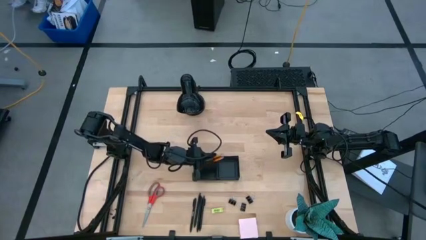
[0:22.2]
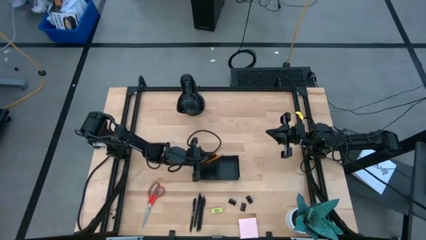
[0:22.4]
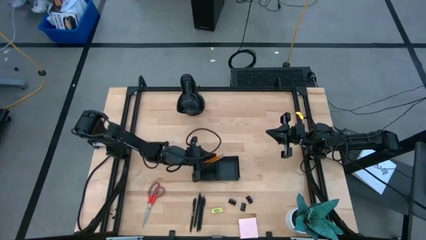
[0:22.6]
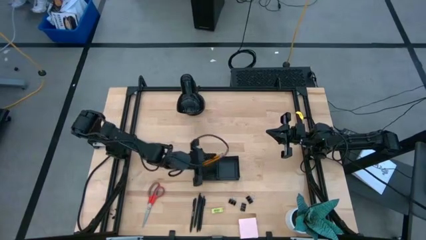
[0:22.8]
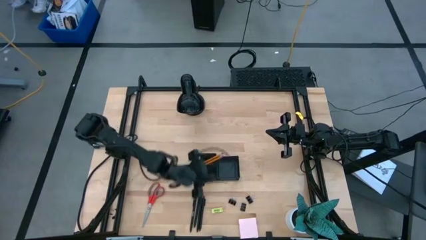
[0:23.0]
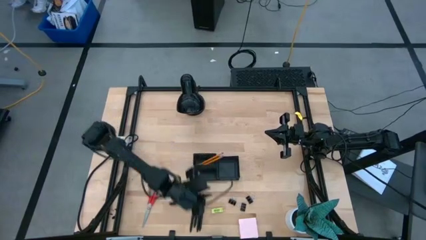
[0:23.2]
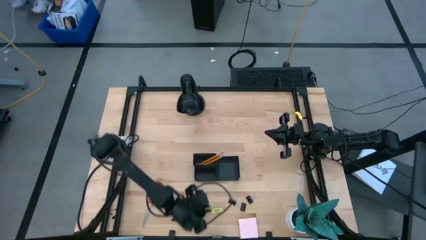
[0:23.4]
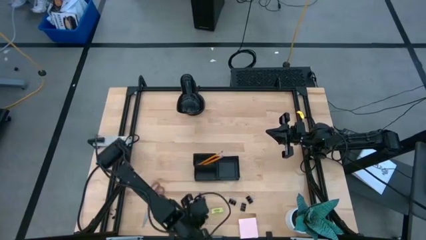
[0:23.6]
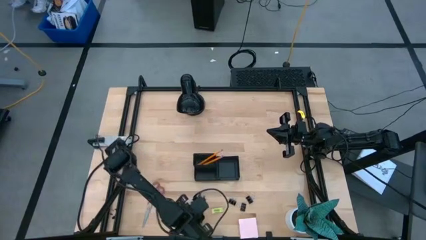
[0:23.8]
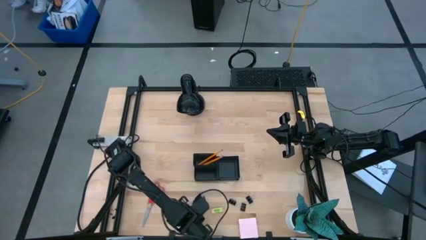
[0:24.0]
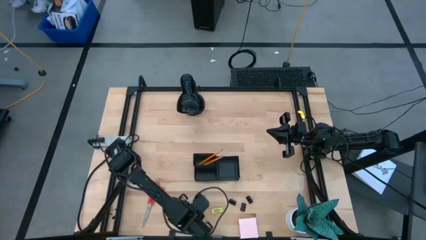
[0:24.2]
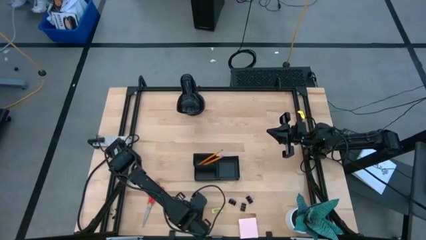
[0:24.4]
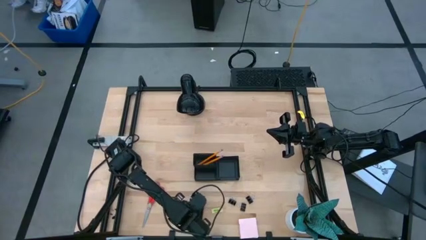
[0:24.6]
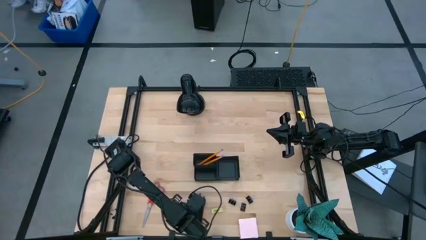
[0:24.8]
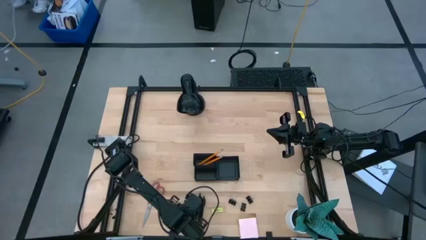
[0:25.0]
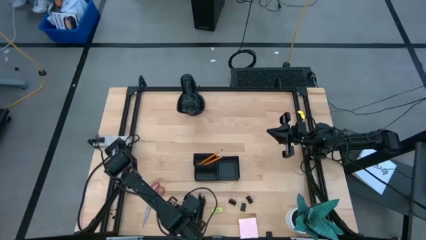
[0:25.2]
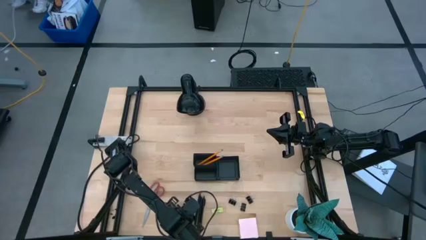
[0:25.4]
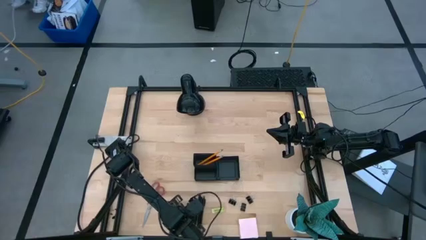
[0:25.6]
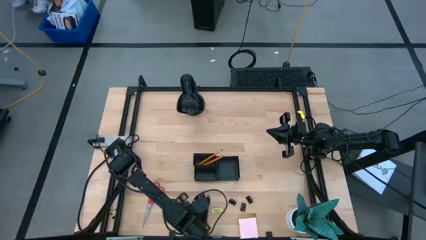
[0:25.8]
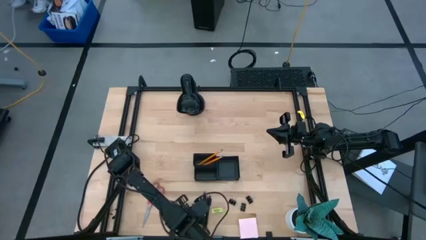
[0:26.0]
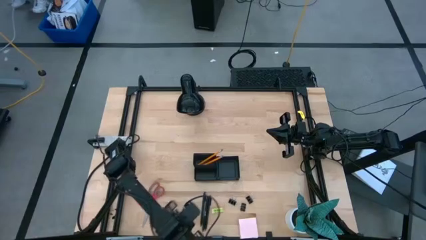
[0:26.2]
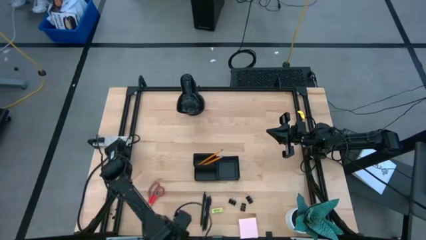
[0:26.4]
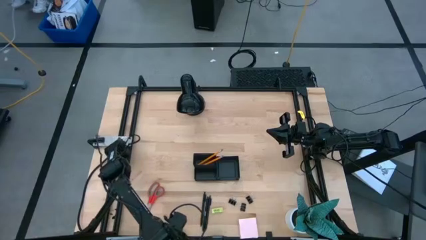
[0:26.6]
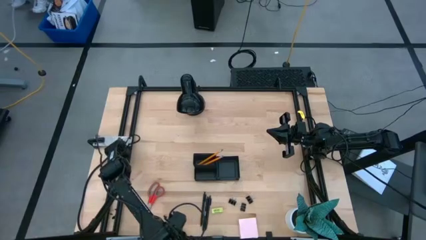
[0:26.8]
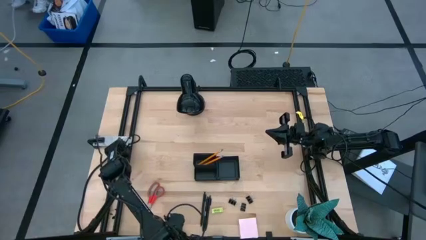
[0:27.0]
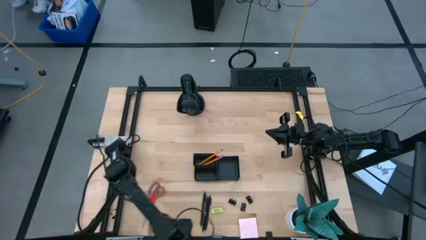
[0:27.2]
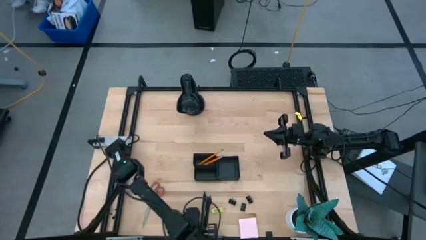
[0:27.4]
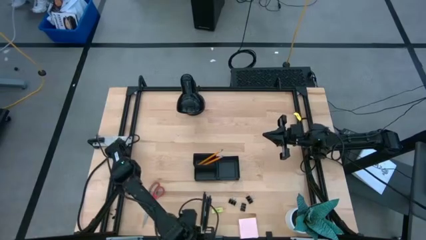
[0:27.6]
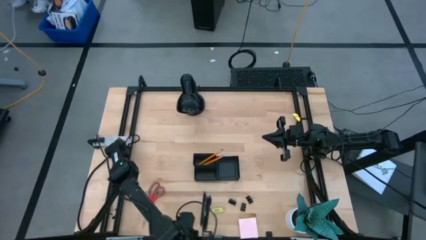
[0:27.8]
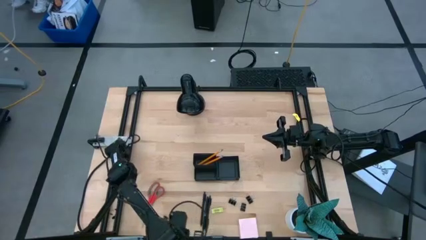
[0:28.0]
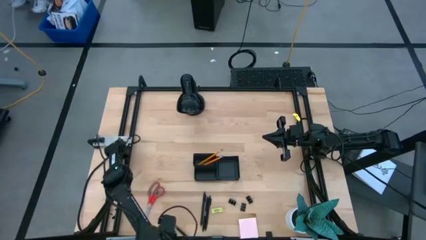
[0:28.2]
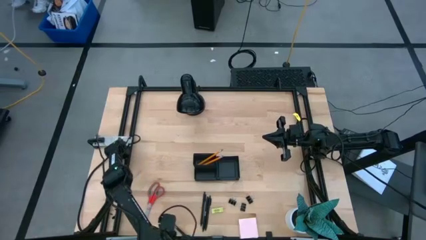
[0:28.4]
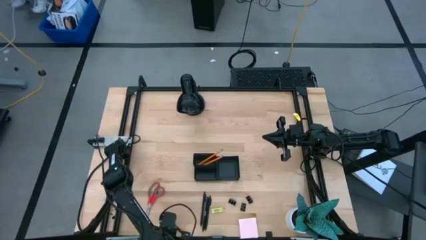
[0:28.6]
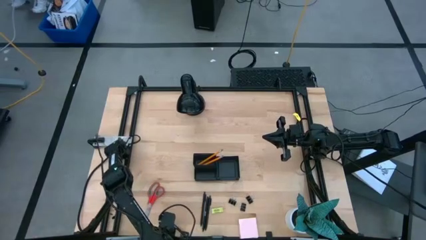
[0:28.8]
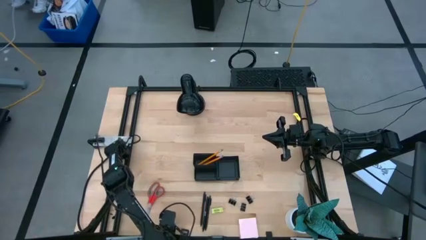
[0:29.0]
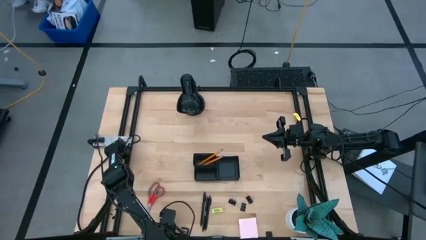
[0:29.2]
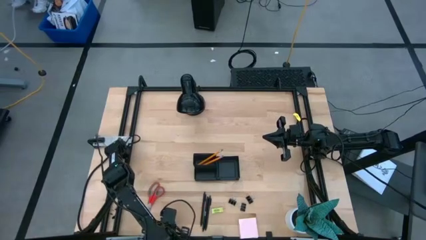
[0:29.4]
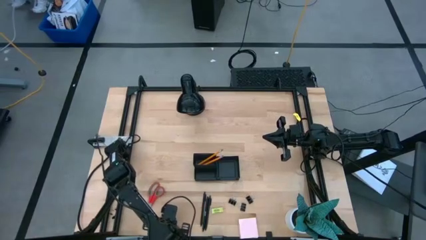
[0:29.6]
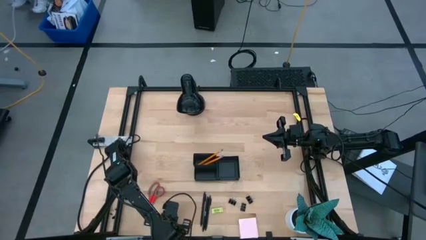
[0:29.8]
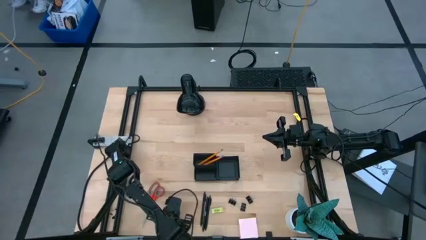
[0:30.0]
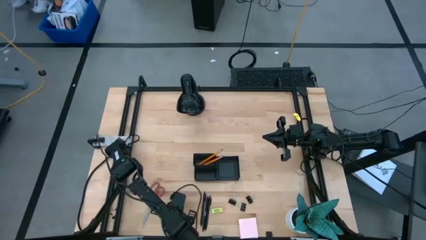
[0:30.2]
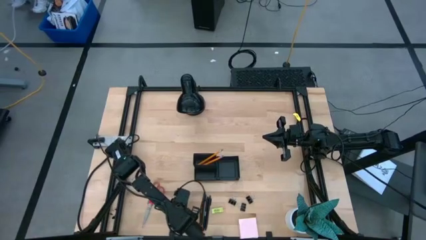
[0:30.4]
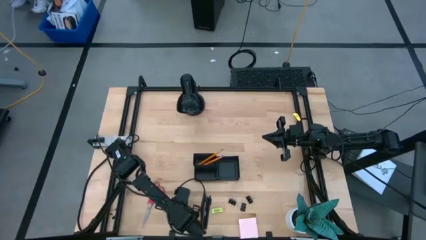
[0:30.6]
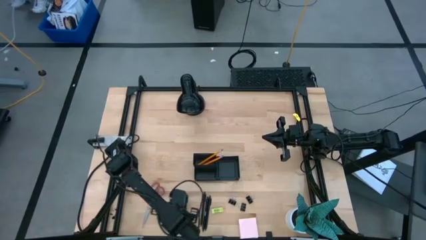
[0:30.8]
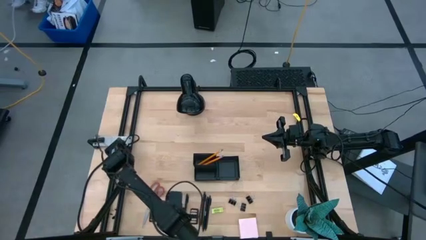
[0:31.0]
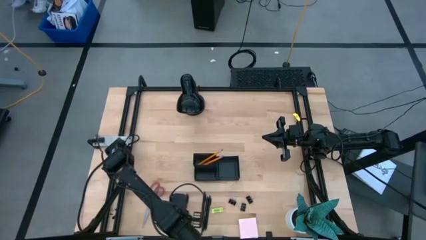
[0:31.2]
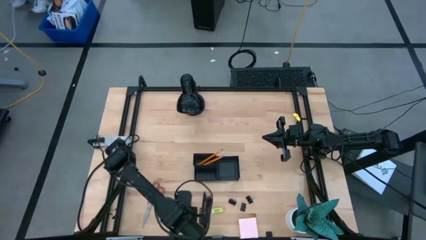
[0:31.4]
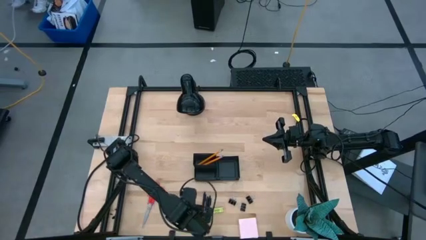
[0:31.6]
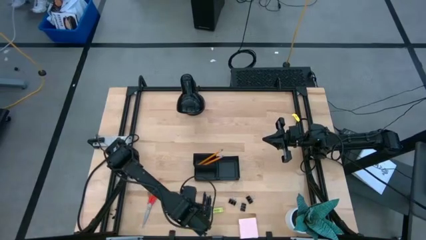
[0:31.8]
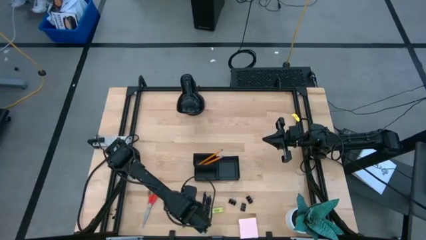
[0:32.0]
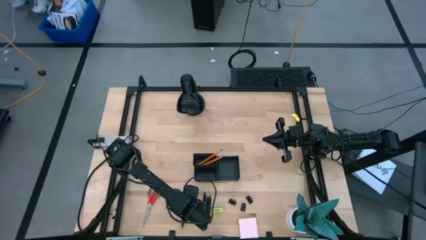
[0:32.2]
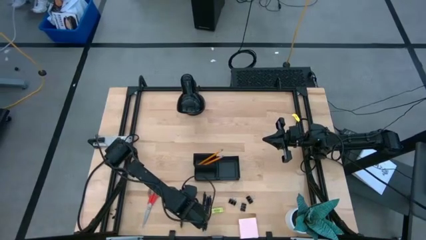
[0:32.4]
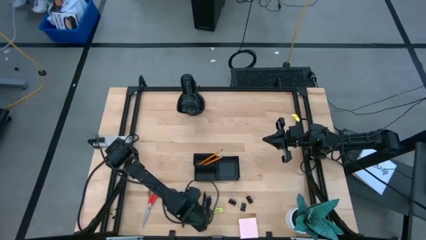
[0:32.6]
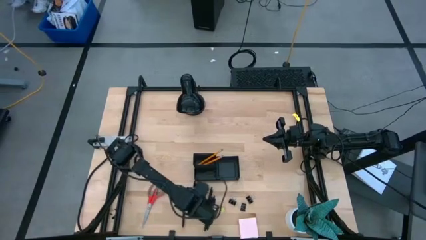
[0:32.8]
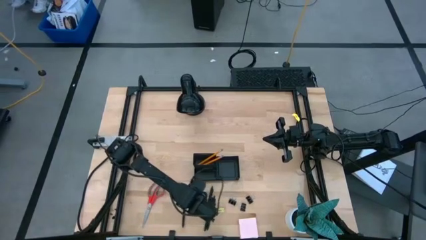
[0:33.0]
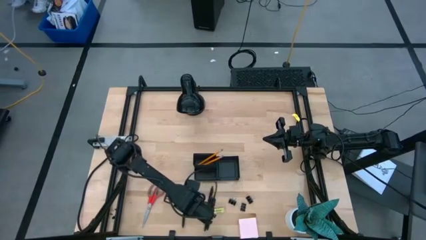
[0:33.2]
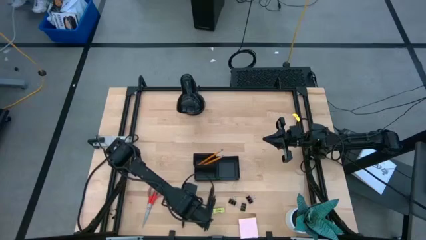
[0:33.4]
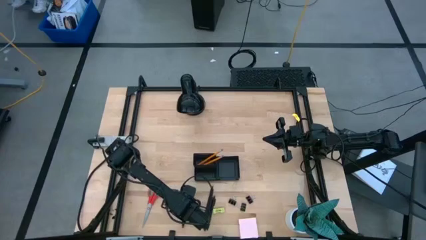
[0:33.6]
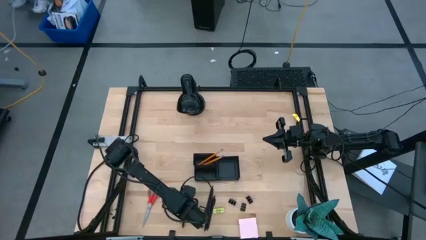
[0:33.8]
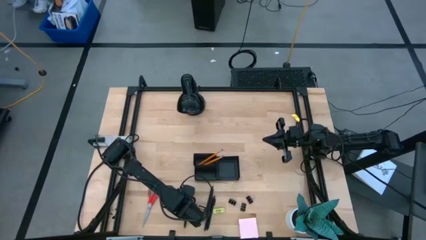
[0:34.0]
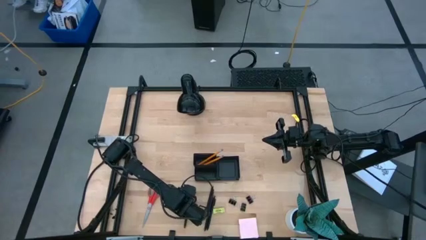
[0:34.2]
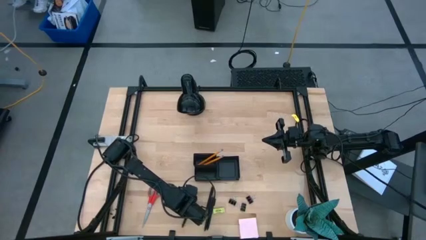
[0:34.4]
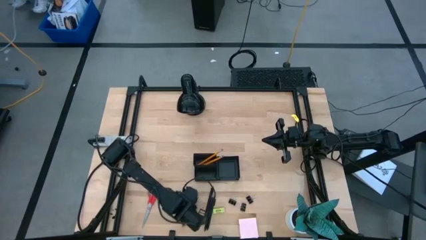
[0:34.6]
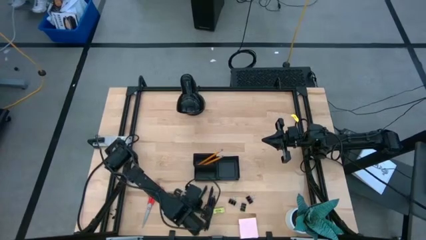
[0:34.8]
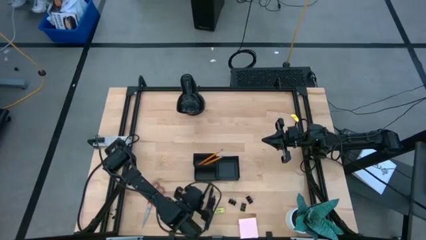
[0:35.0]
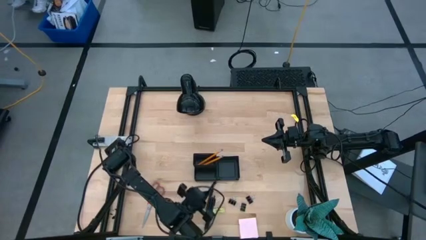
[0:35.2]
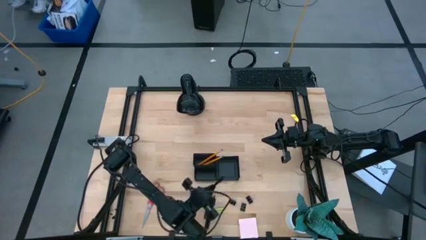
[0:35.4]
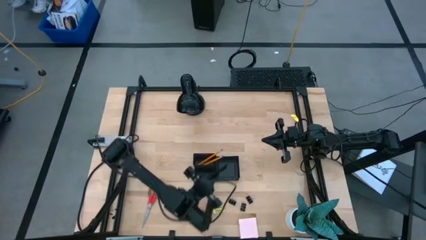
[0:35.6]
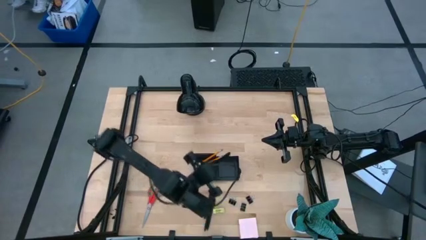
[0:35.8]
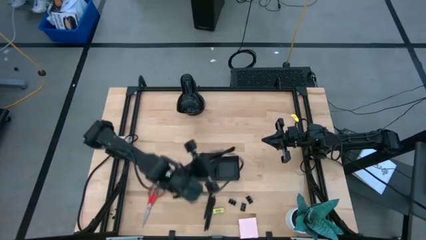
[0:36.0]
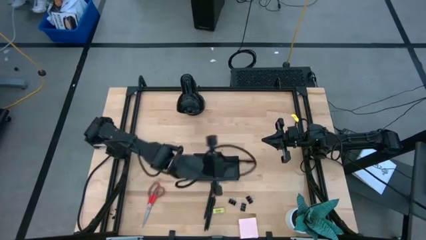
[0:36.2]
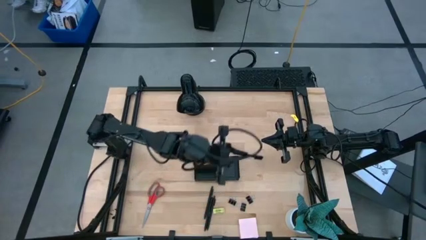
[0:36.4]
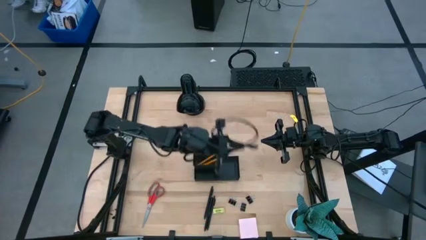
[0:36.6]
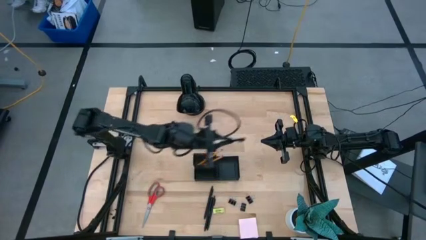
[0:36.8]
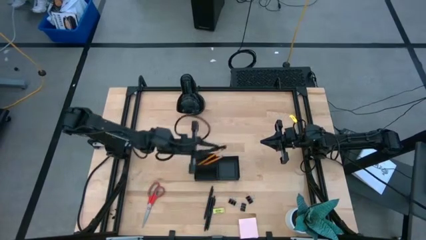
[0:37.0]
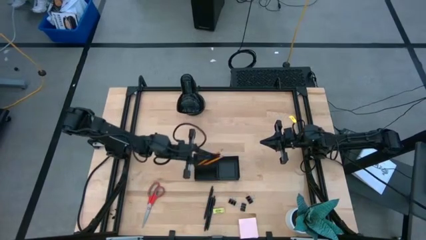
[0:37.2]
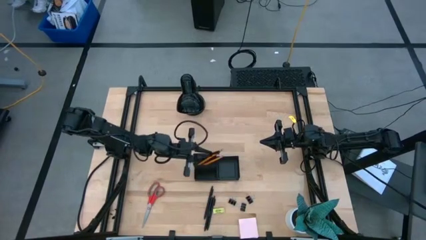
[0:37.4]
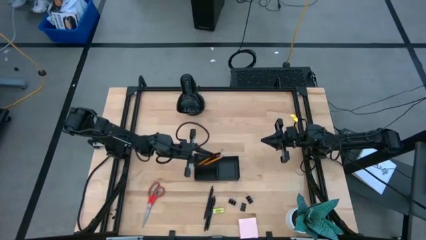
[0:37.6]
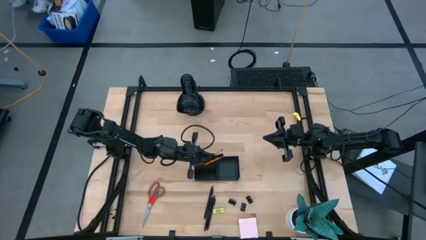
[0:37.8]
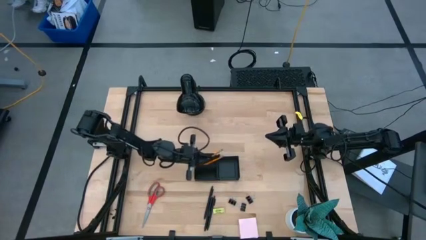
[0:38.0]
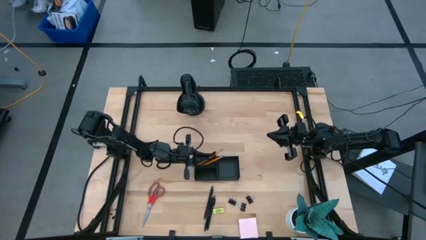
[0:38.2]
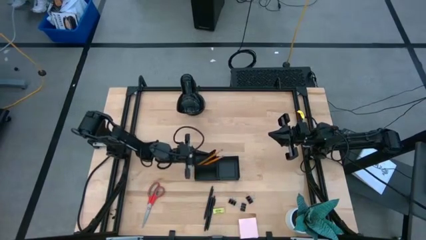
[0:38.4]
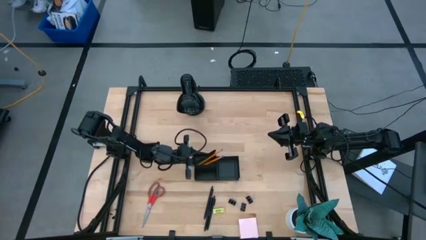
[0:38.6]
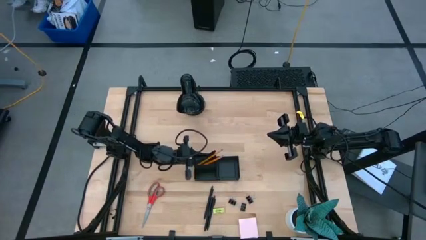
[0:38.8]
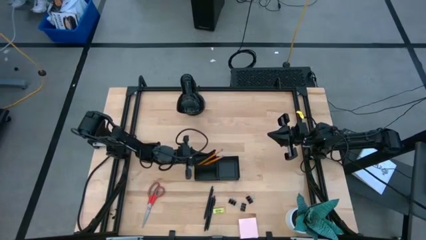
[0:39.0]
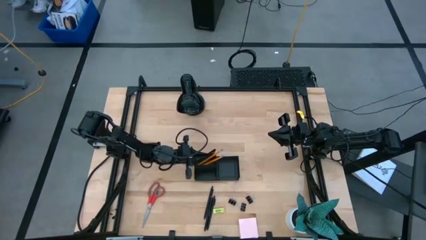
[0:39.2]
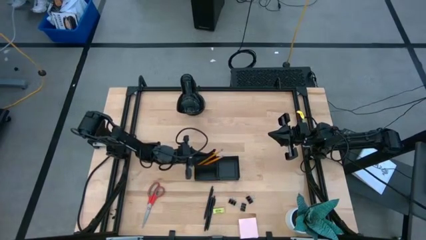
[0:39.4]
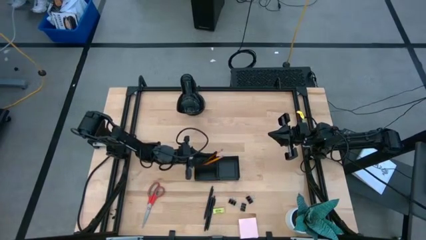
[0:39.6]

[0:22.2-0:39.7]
Task: Pick and place office supplies into organizer
Put the black pen into the desk organizer
